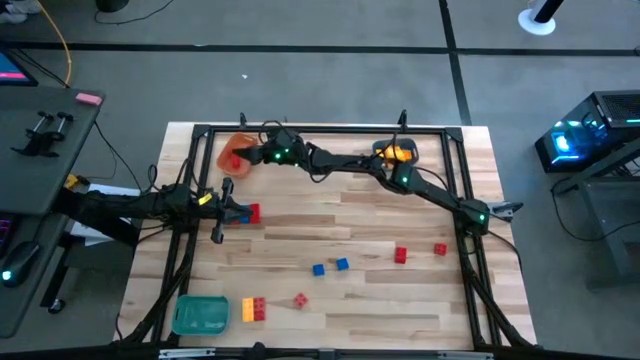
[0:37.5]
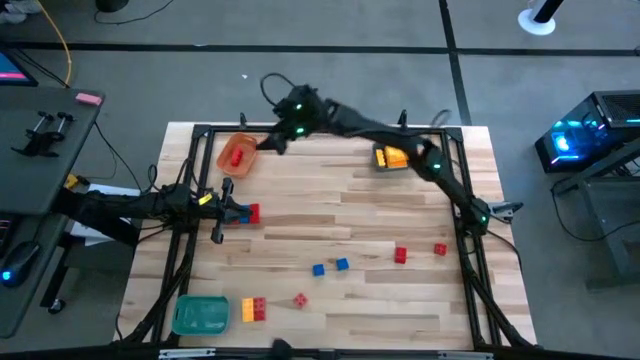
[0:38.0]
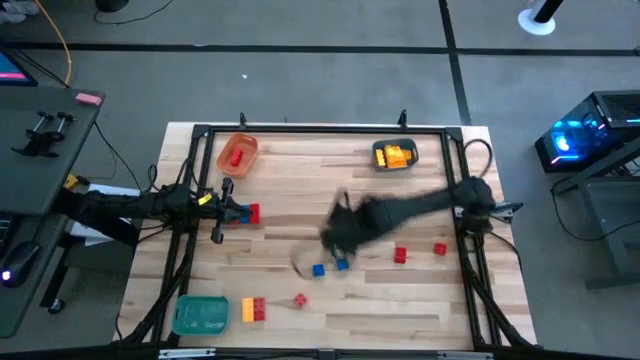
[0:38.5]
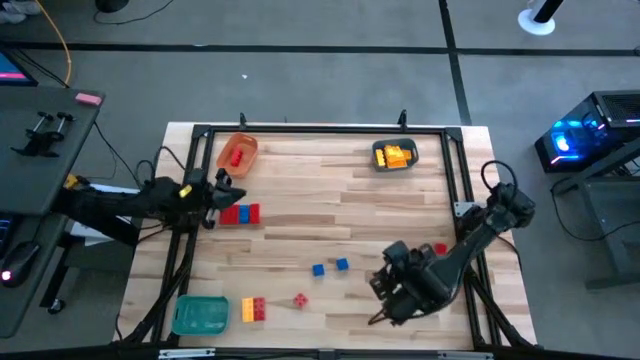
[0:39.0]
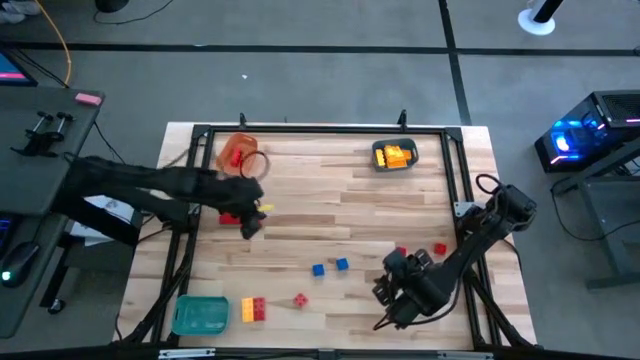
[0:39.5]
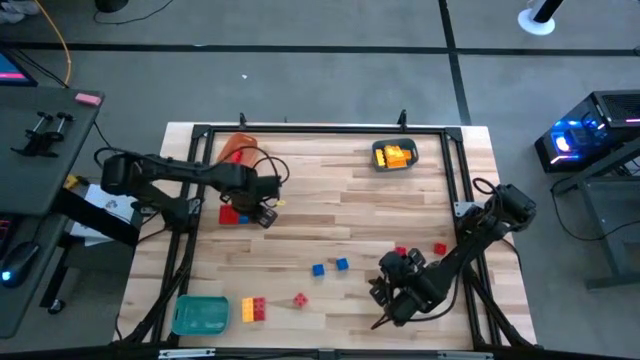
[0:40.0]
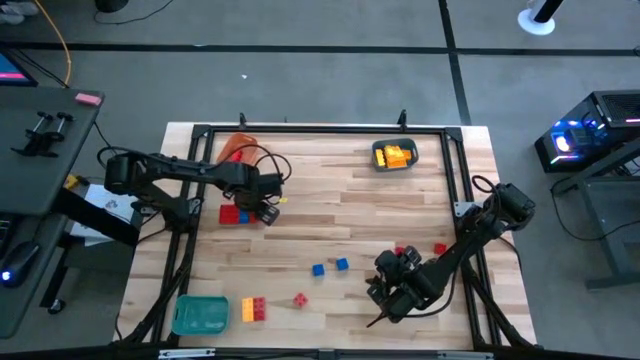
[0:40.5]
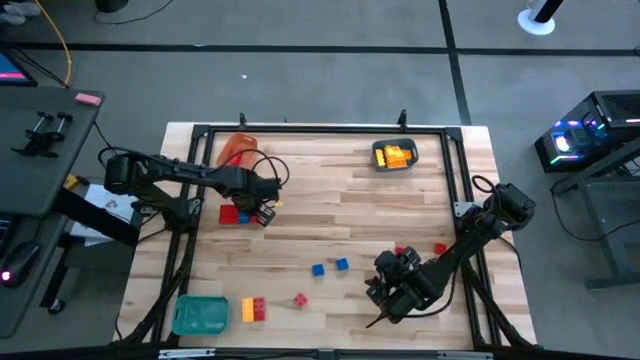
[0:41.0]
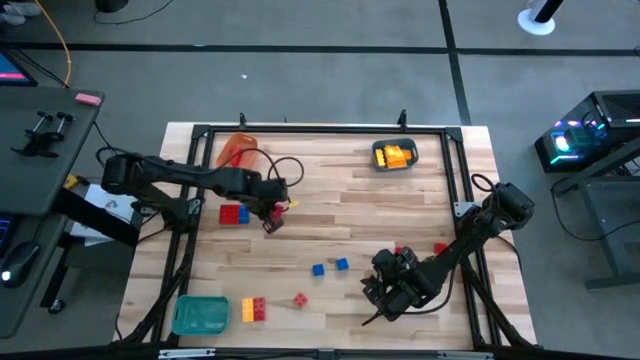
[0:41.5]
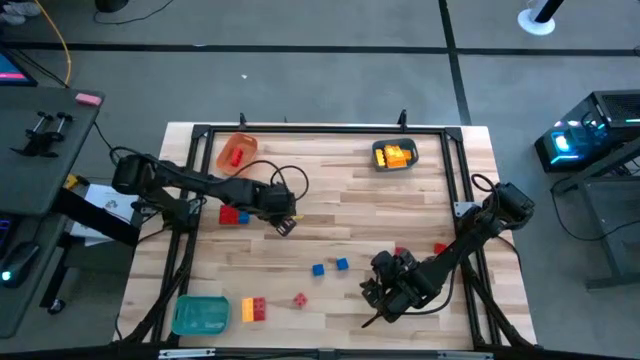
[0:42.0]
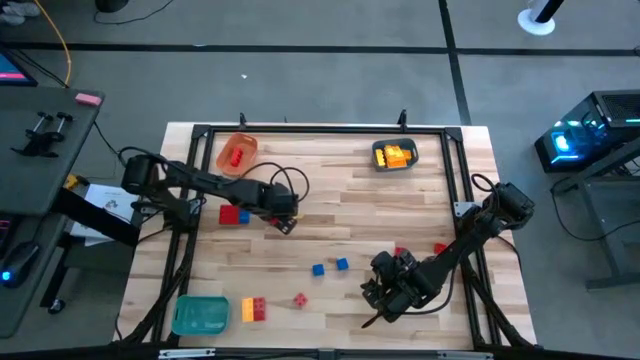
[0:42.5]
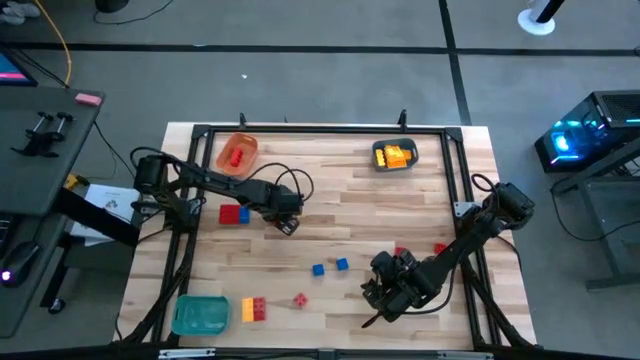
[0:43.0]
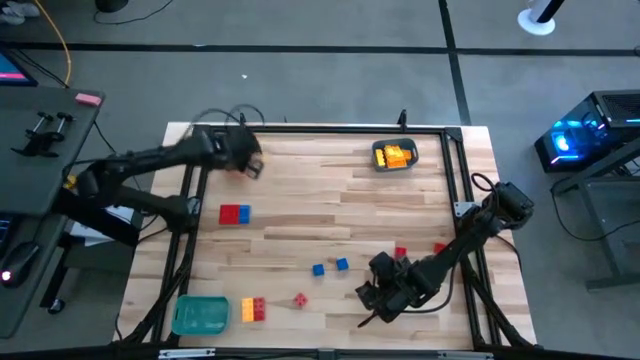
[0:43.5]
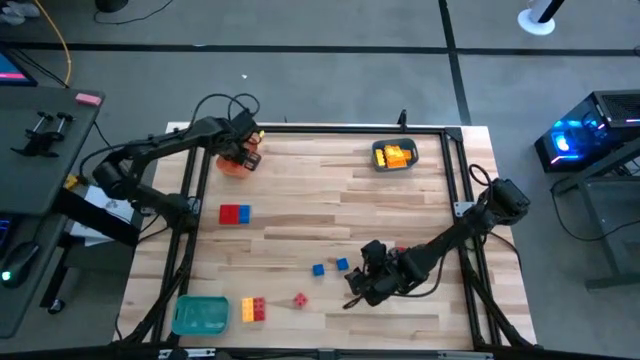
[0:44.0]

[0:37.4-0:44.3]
Task: Sort blocks
Put the red game piece into the orange bin

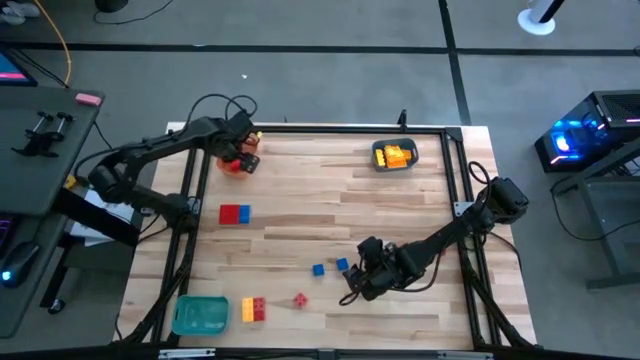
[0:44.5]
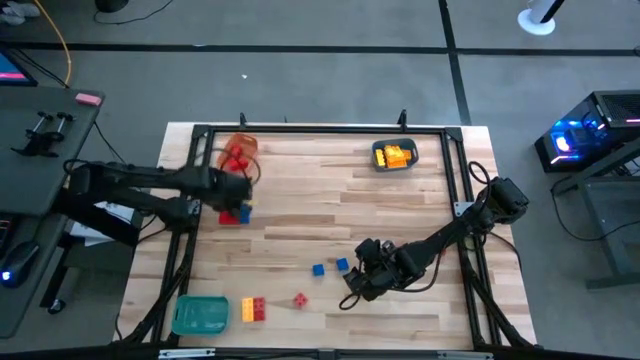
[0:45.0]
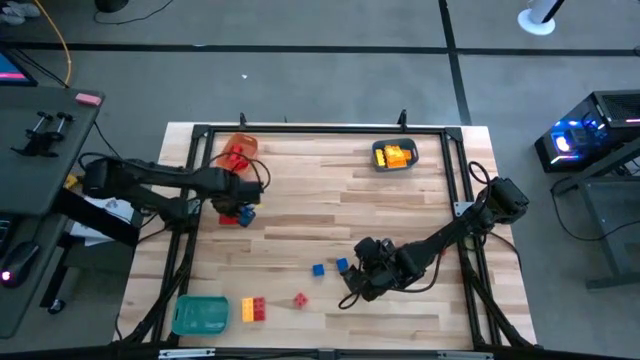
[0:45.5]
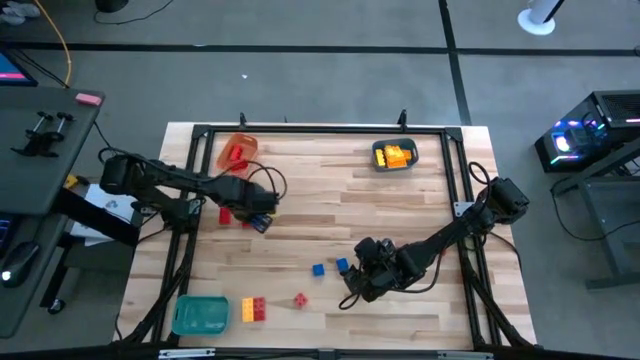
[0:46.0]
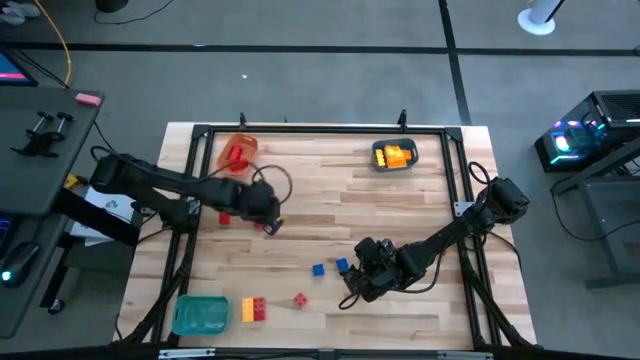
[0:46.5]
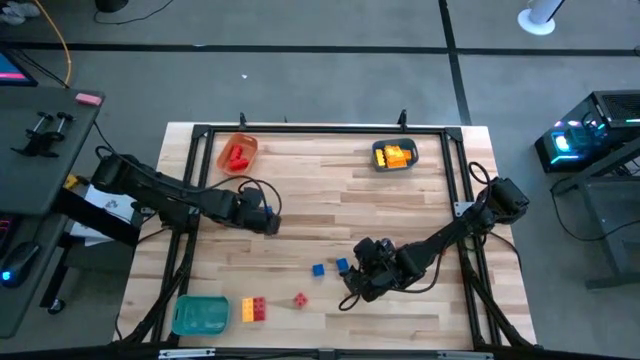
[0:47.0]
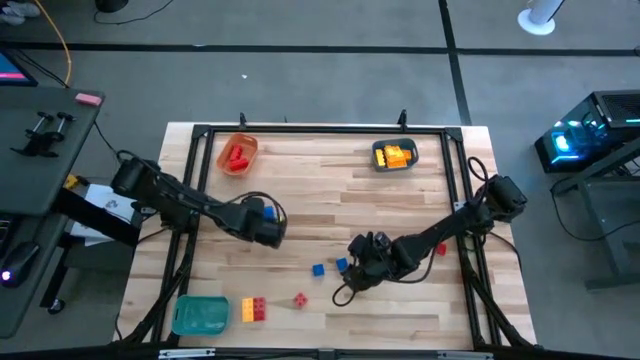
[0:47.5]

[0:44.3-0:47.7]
Put the red game piece into the orange bin

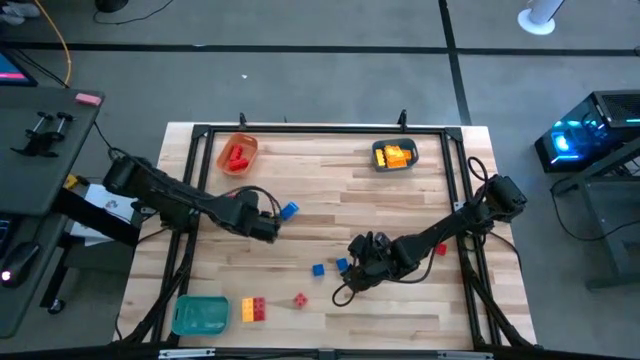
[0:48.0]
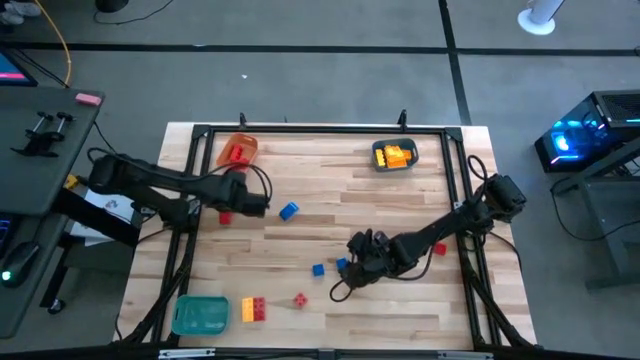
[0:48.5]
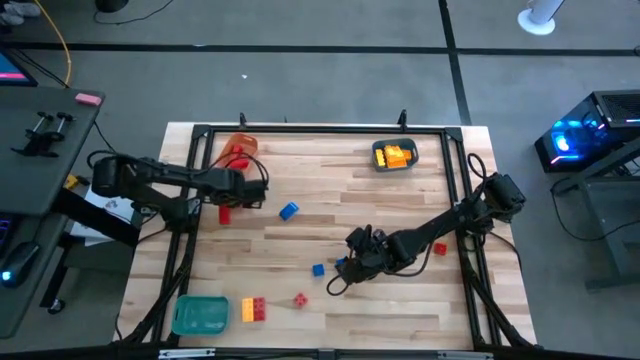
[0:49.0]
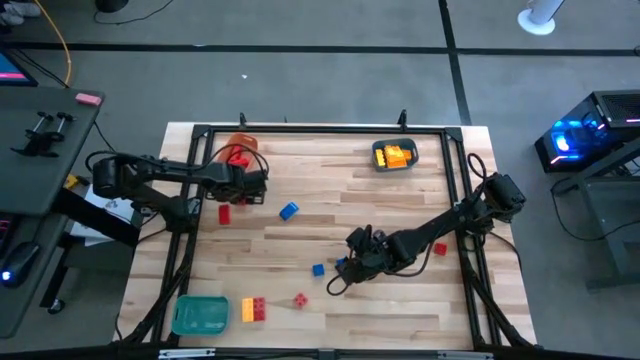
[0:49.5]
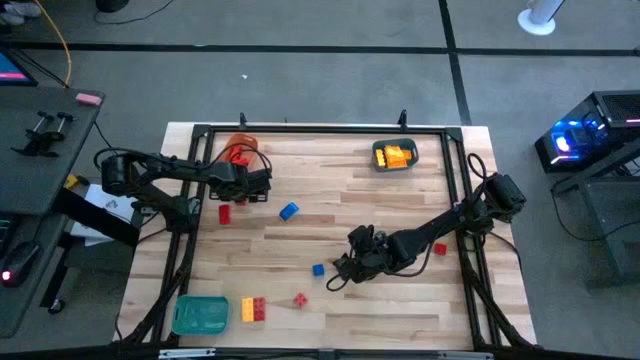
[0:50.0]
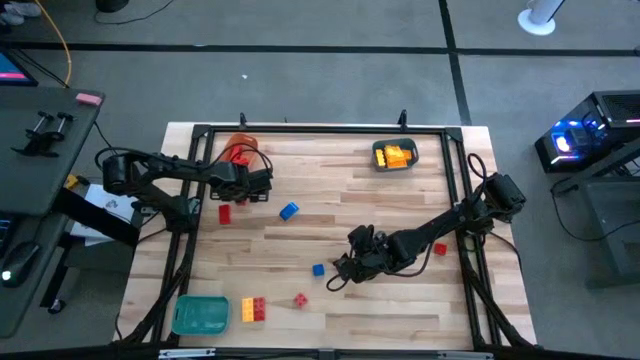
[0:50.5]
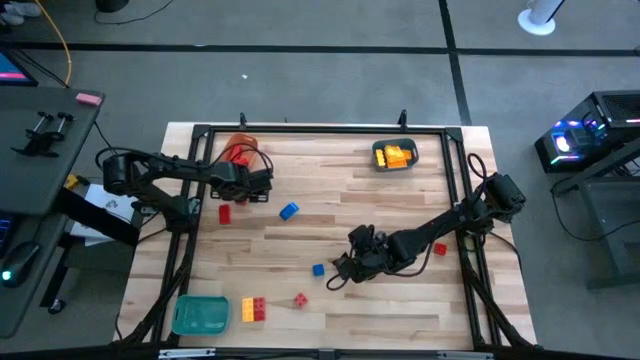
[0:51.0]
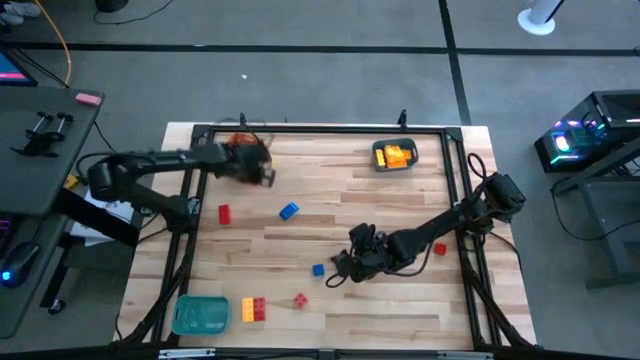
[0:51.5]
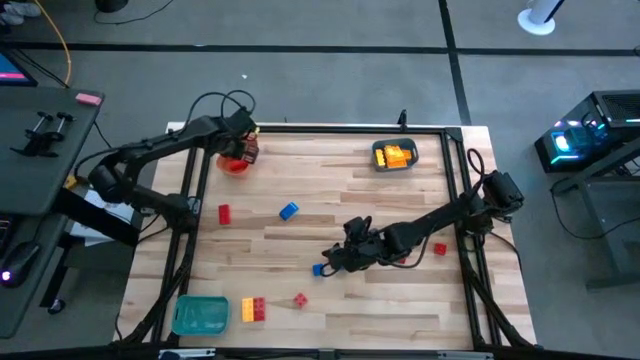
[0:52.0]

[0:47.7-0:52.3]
Put the red game piece into the orange bin

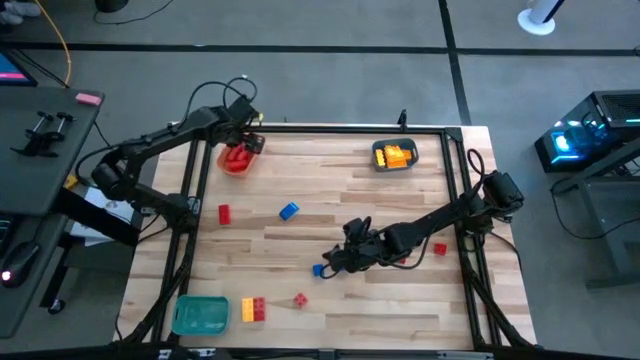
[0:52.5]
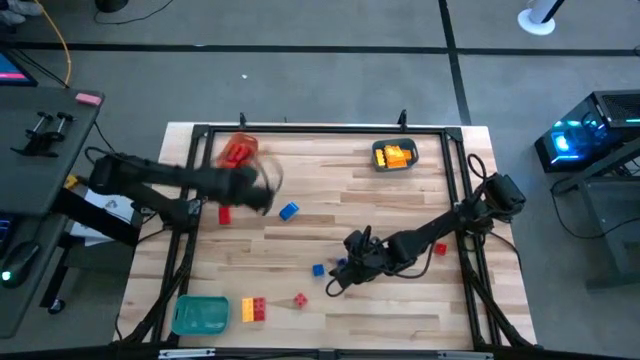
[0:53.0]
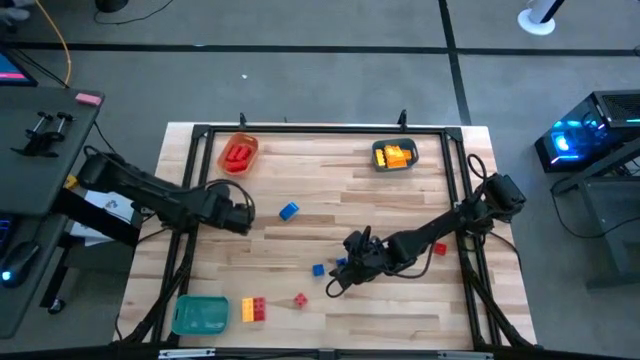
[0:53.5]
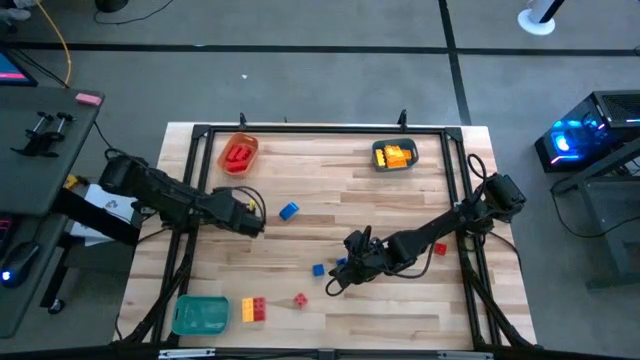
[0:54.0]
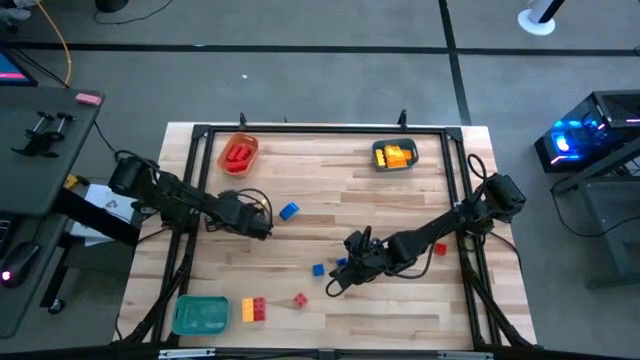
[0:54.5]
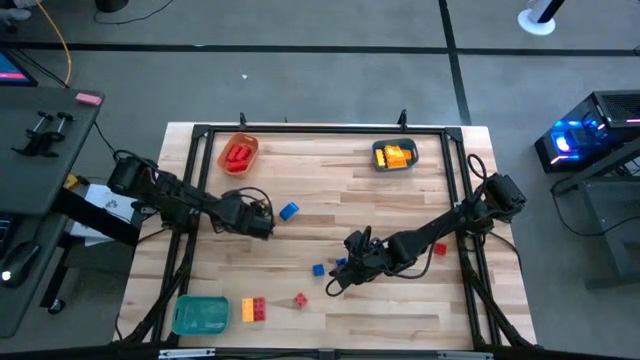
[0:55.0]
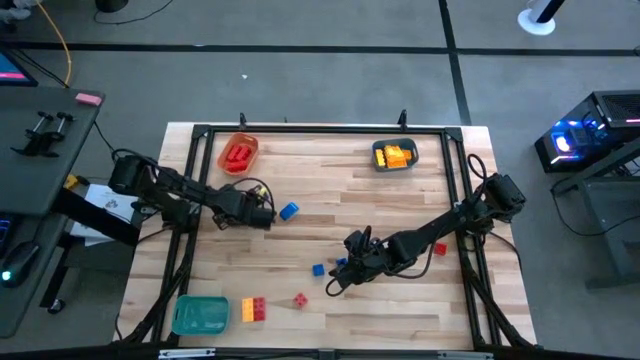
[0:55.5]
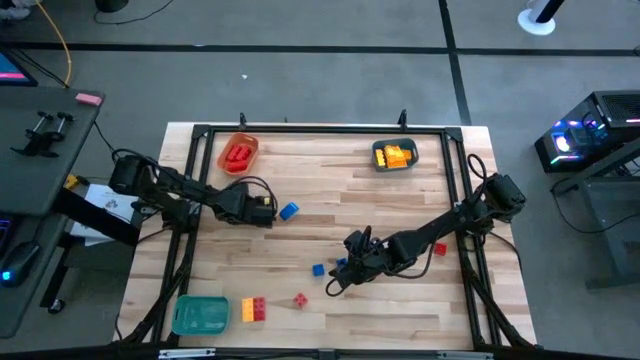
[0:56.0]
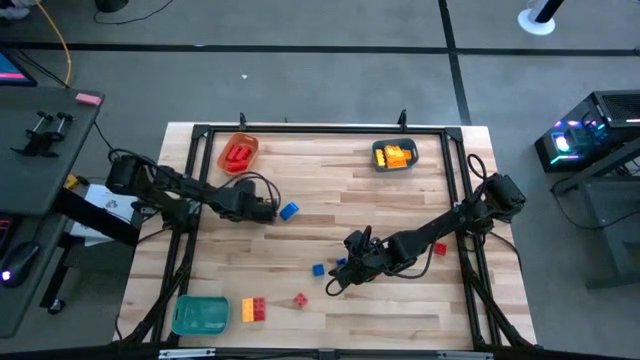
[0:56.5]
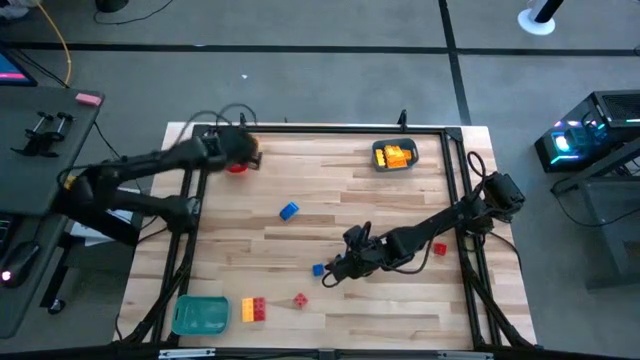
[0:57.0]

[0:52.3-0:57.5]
Put the red game piece into the orange bin

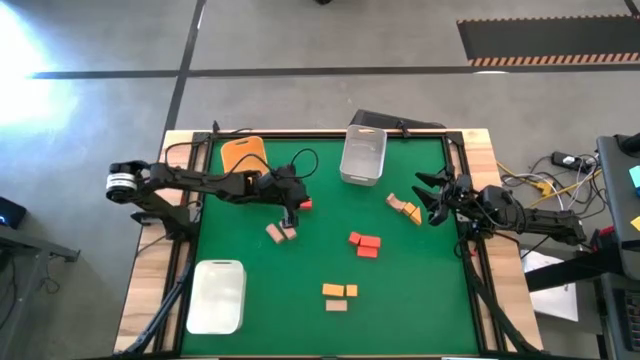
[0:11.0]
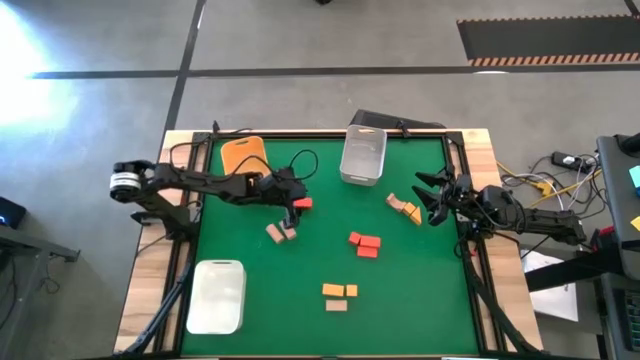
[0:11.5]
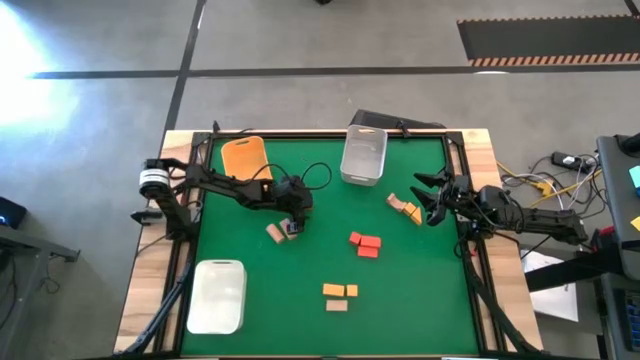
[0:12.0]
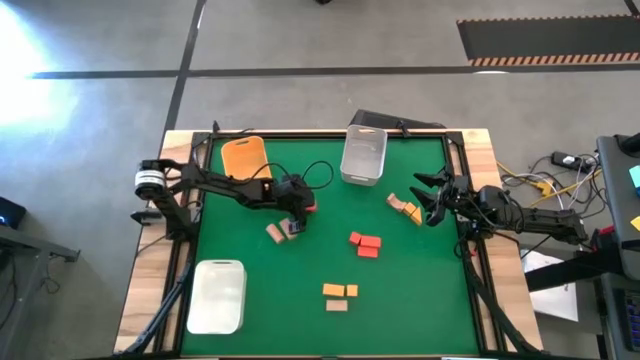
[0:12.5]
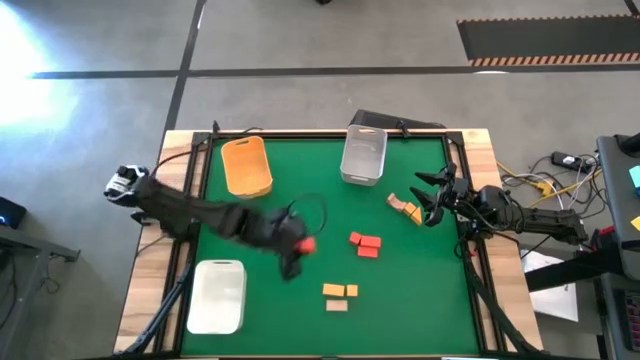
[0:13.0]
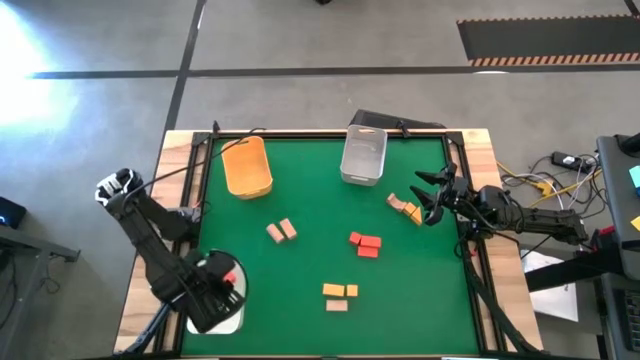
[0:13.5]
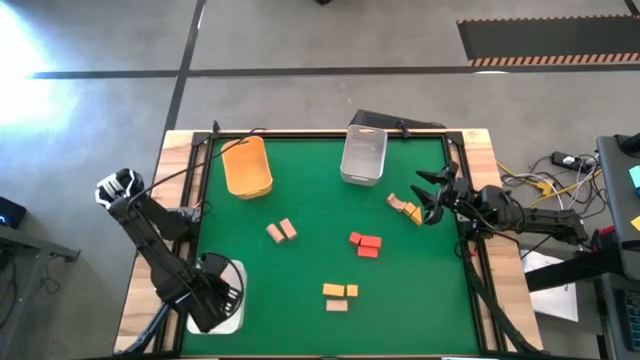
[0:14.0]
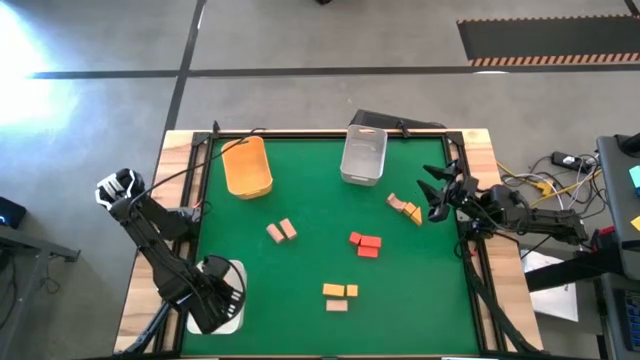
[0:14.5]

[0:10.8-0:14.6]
Task: Sort & place blocks by color
Put the orange block into the white bin
